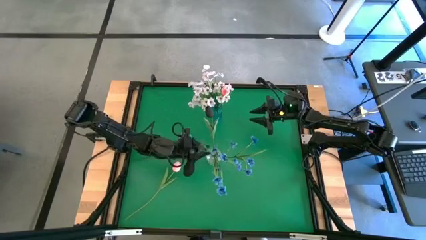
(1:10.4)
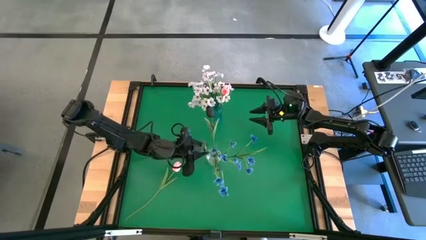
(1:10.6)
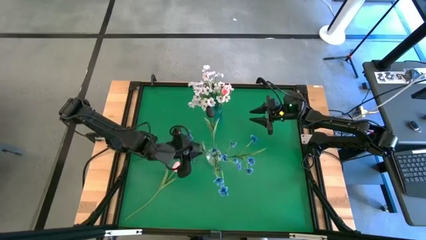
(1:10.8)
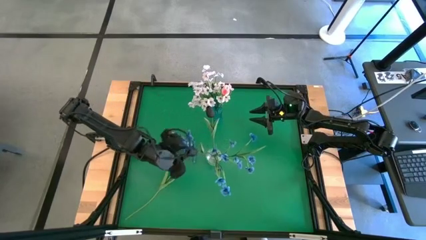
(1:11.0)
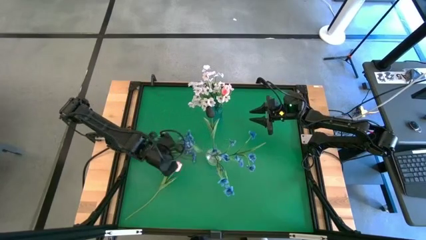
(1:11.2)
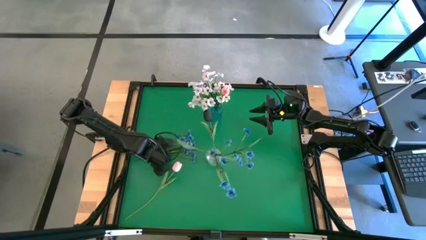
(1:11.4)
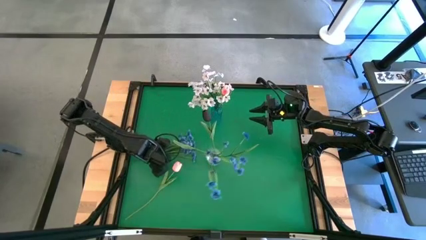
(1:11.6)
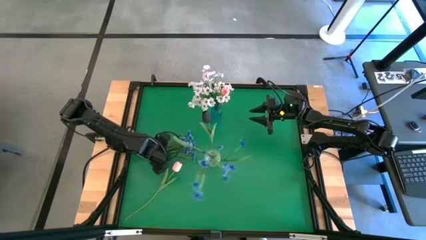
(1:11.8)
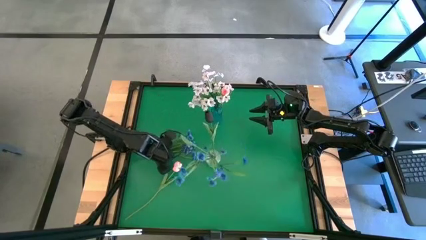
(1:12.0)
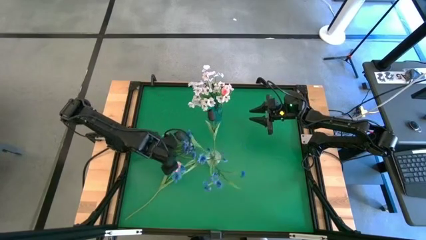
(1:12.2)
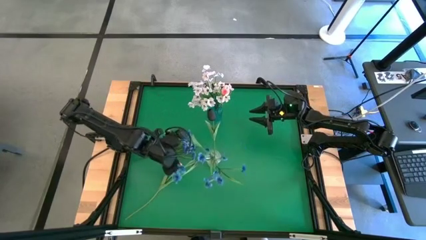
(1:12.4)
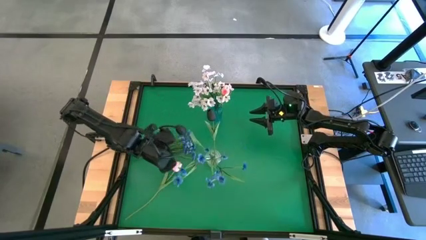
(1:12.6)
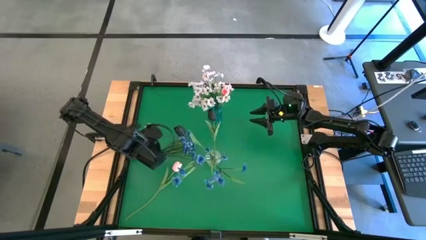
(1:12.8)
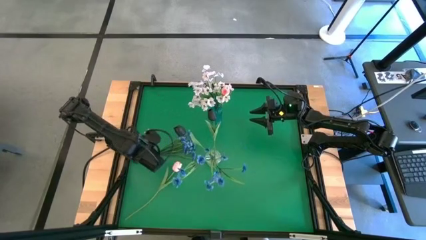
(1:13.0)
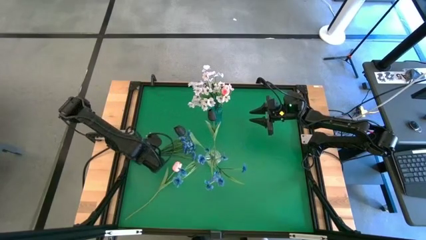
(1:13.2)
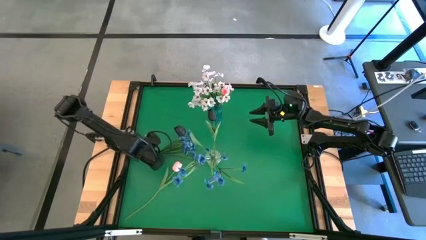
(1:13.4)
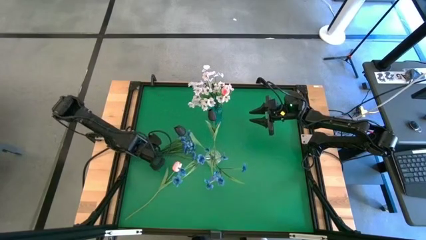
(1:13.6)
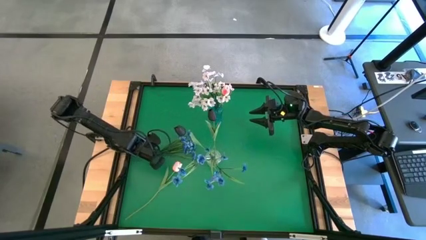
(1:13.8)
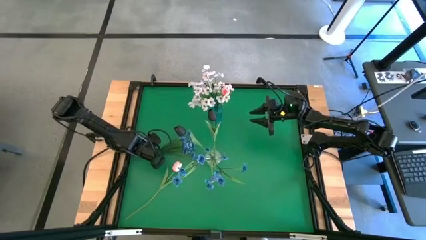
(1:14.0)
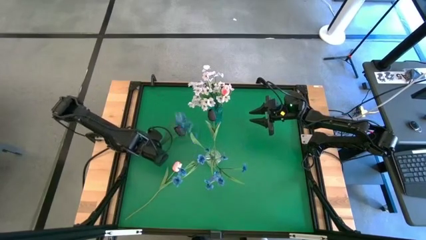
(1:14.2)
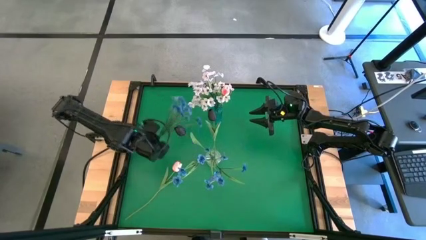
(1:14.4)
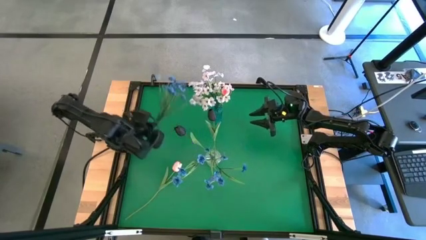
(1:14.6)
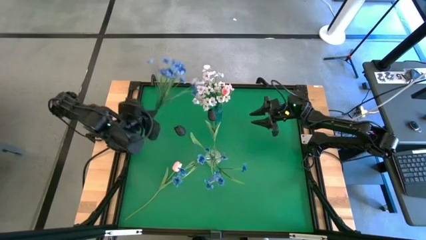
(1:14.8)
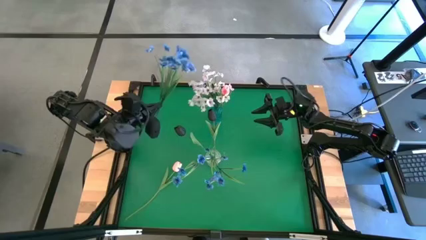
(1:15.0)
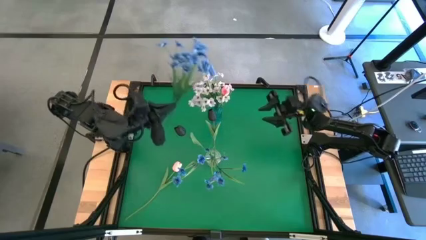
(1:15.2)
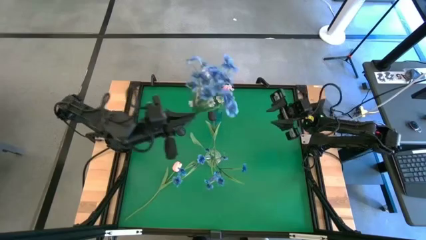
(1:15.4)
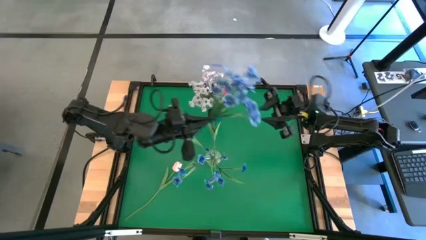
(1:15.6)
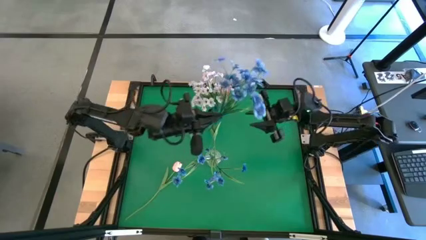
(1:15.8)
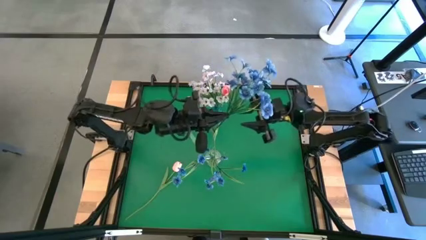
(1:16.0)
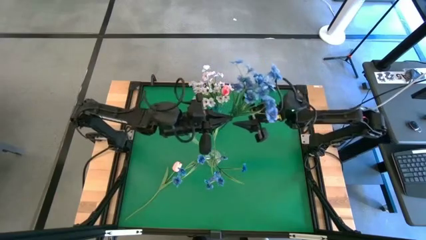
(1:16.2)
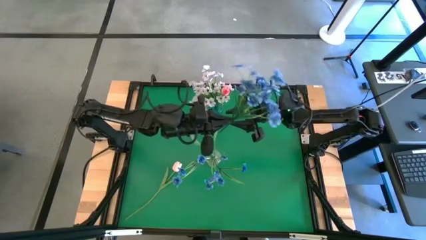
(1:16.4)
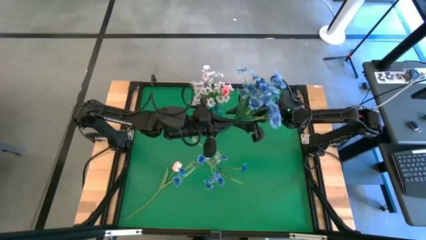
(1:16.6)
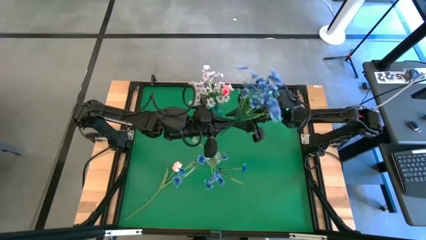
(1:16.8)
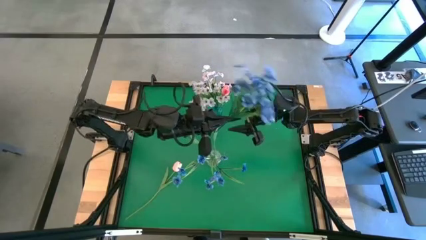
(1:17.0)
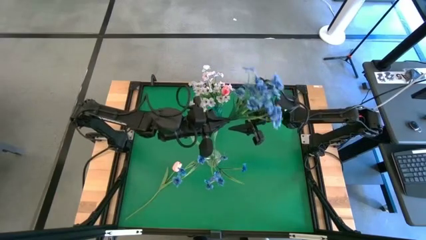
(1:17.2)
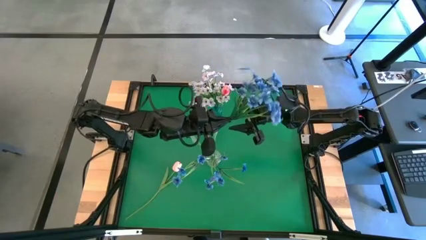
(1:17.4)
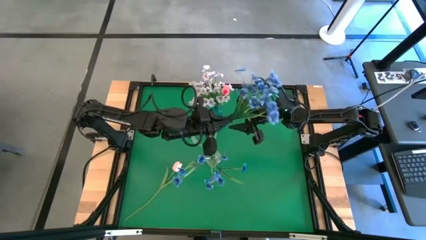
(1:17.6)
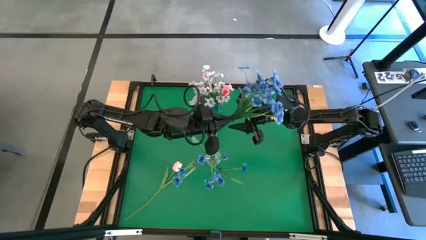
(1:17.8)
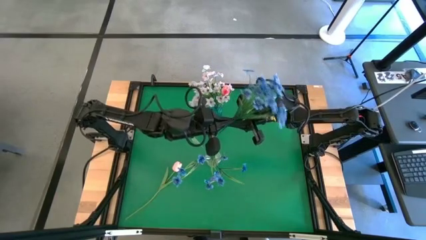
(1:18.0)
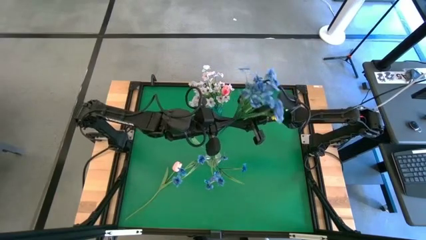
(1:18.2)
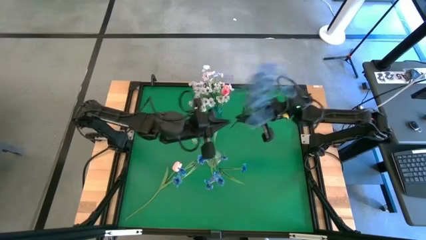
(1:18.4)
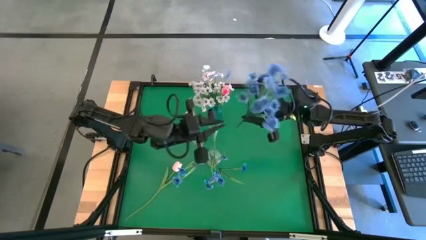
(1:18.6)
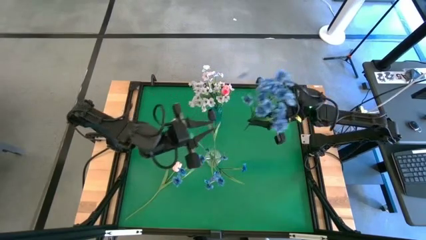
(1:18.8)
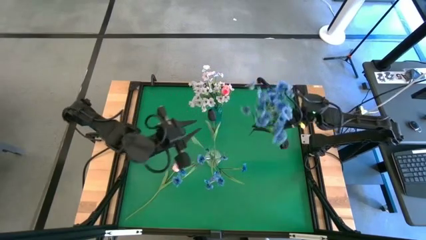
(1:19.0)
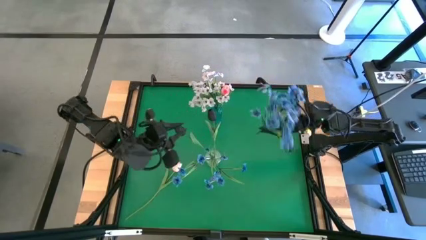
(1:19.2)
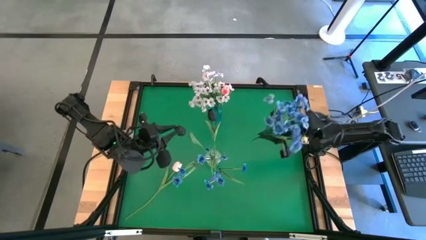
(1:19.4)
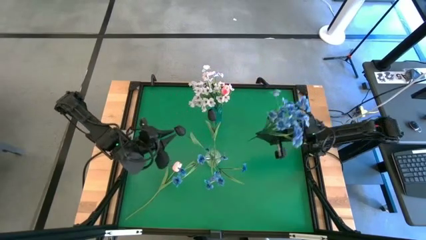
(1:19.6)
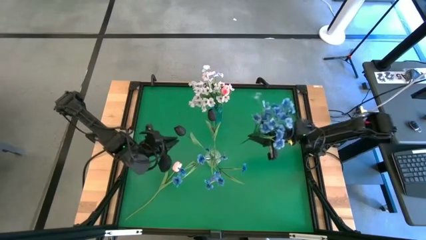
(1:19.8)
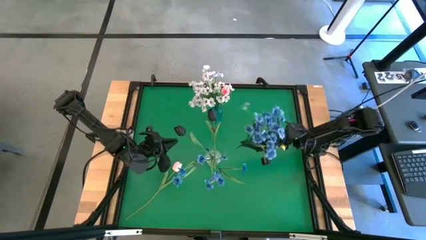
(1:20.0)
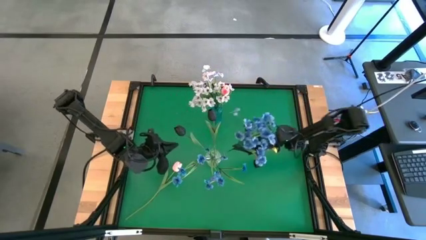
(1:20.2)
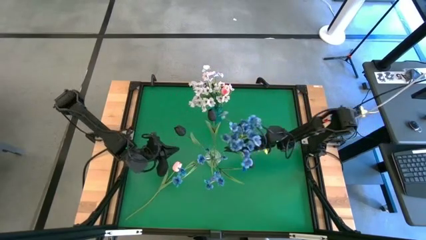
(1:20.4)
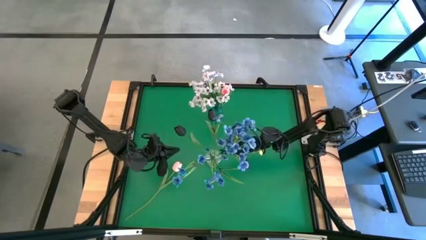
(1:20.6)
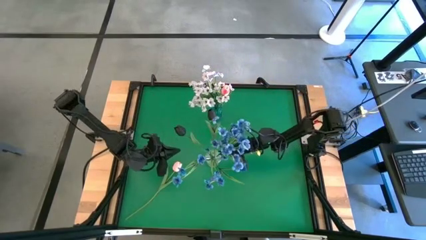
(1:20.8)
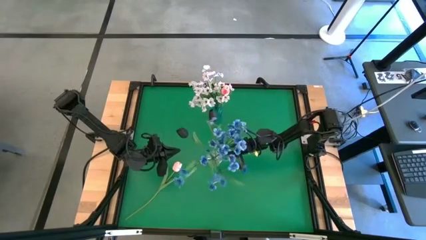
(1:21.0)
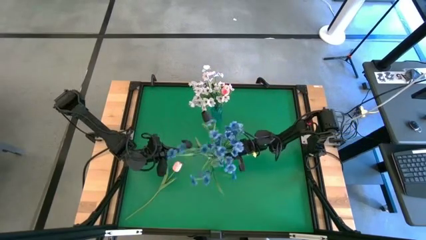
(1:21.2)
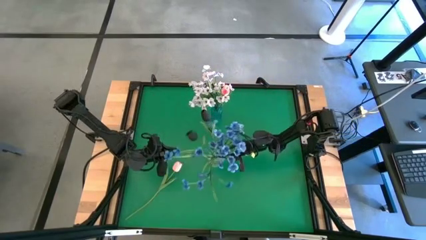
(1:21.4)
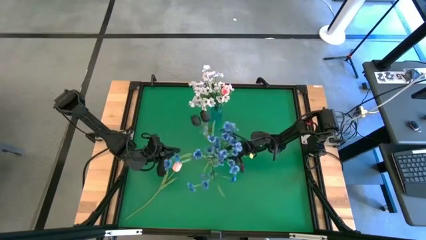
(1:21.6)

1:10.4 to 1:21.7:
Task: Sort flowers into vase by color
Put the blue flowers into the transparent vase

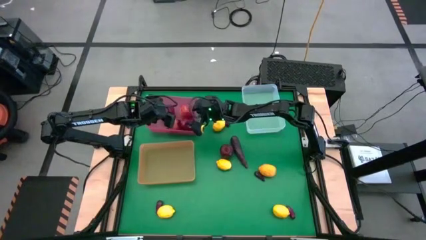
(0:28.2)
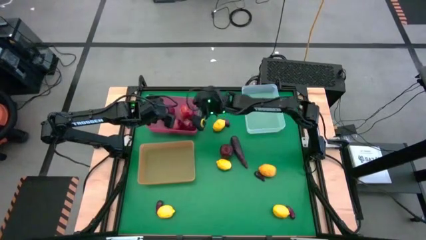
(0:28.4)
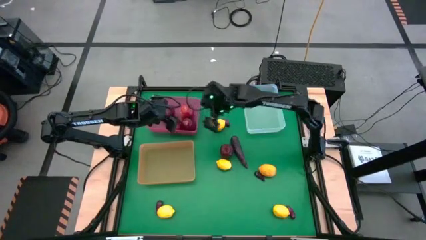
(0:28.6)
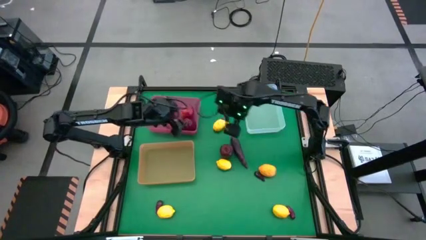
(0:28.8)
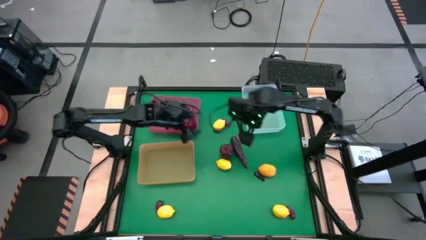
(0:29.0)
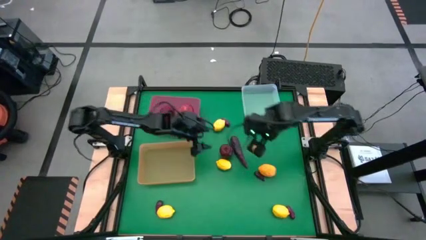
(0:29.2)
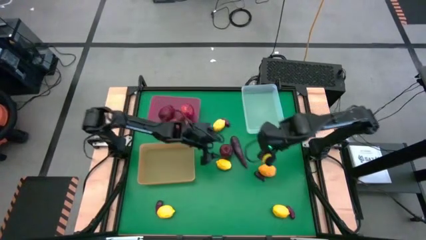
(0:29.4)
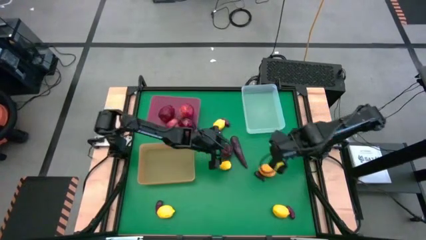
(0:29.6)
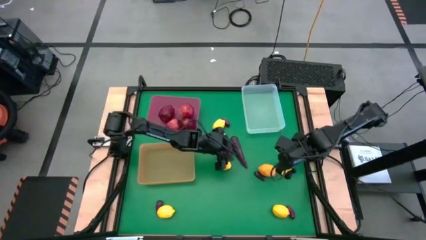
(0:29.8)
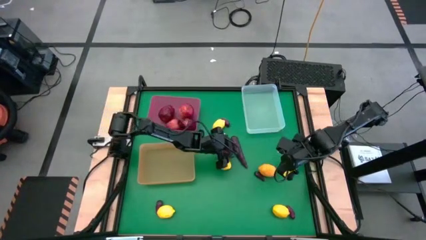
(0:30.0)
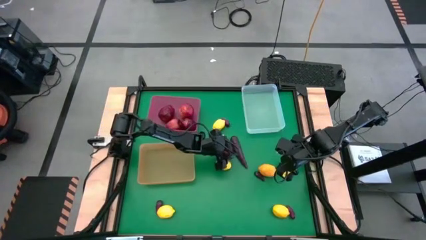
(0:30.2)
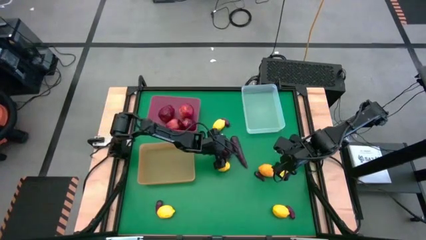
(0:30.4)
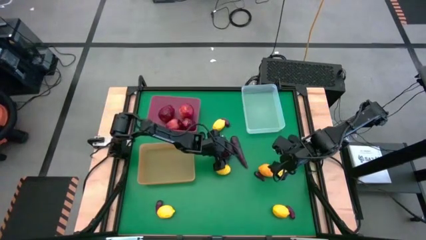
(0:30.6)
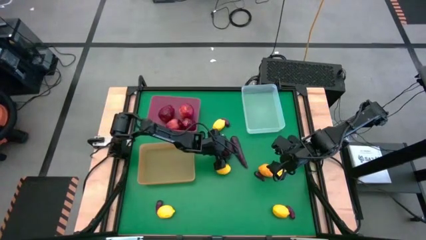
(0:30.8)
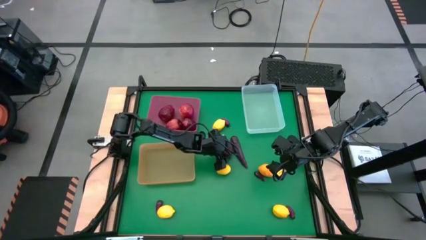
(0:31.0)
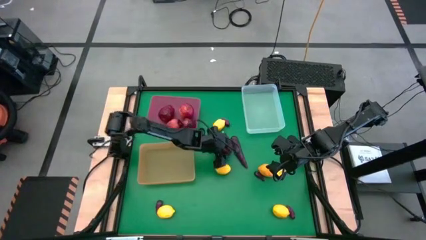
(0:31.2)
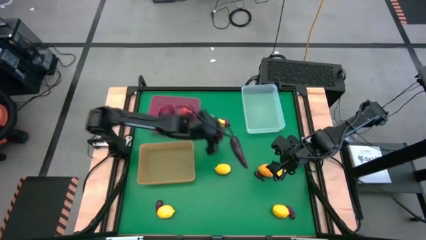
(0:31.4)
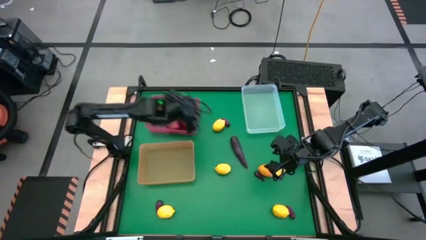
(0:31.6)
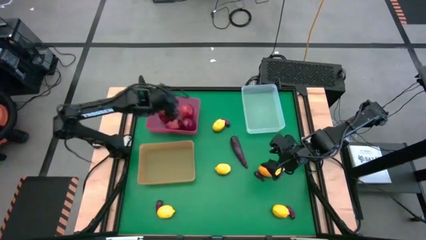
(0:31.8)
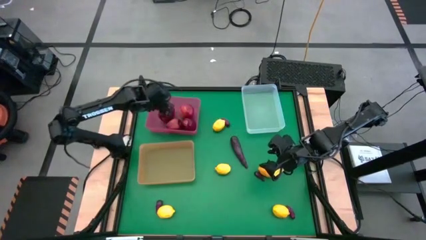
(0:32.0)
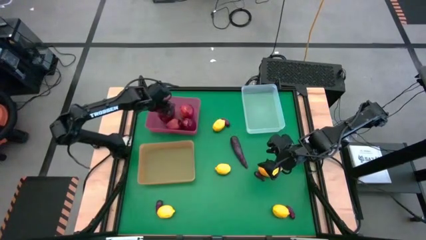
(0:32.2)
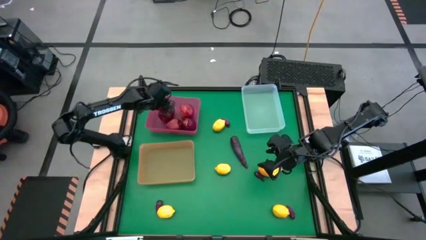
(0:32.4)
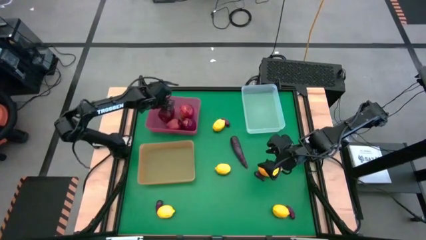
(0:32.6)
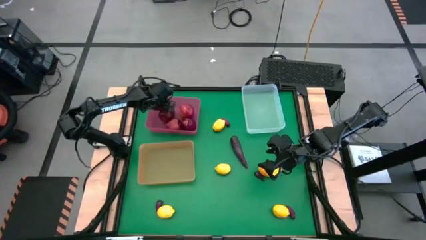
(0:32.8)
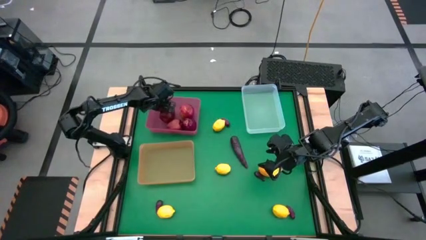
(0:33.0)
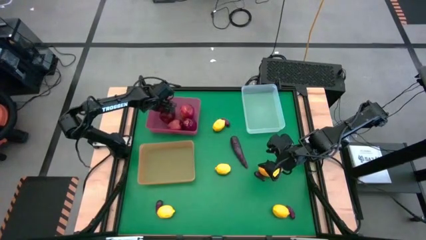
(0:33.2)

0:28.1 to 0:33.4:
Task: Sort produce into baskets
Put the apple into the pink bin
